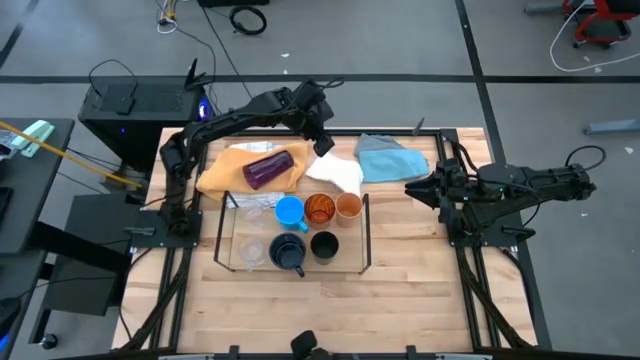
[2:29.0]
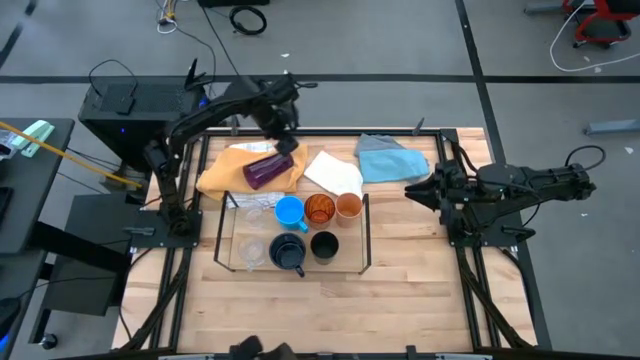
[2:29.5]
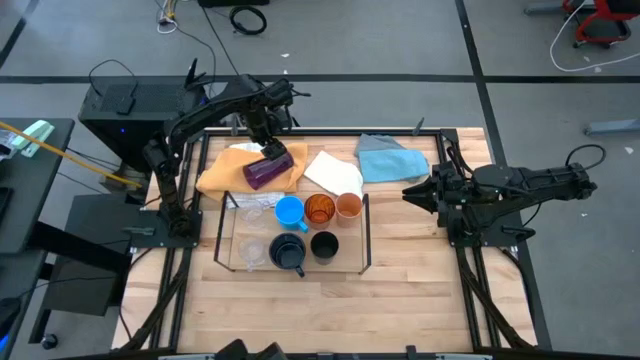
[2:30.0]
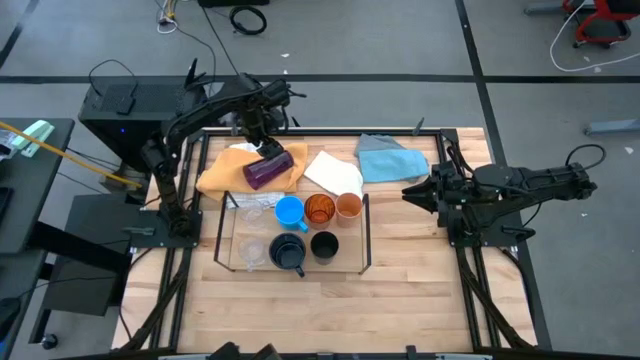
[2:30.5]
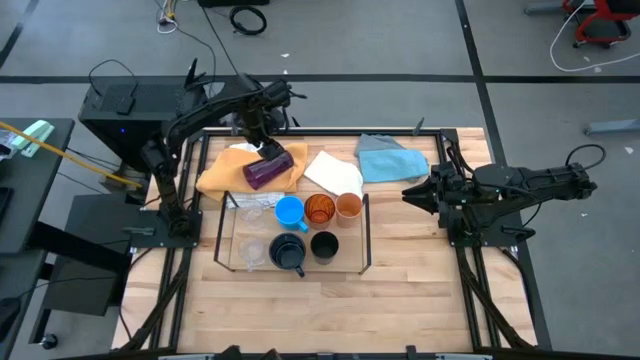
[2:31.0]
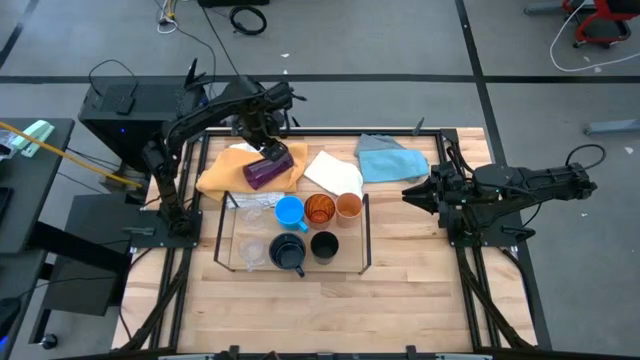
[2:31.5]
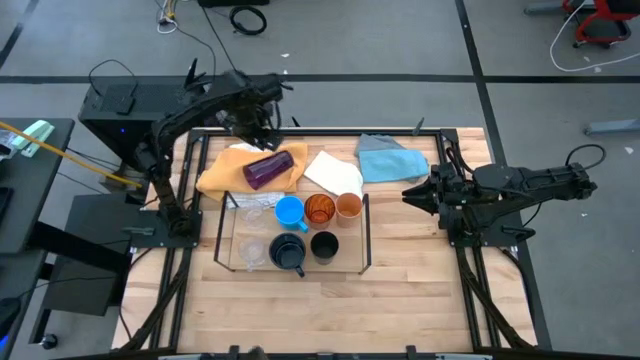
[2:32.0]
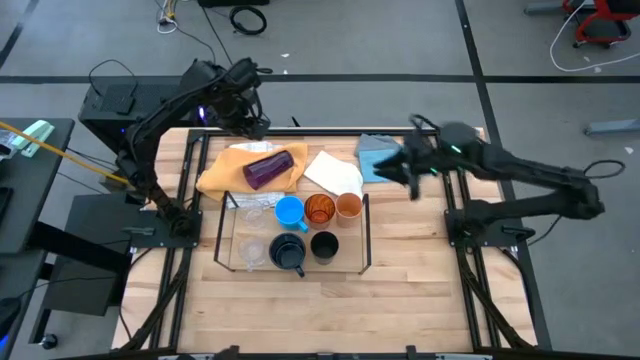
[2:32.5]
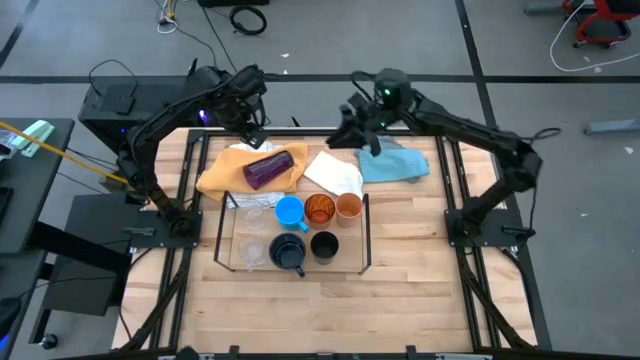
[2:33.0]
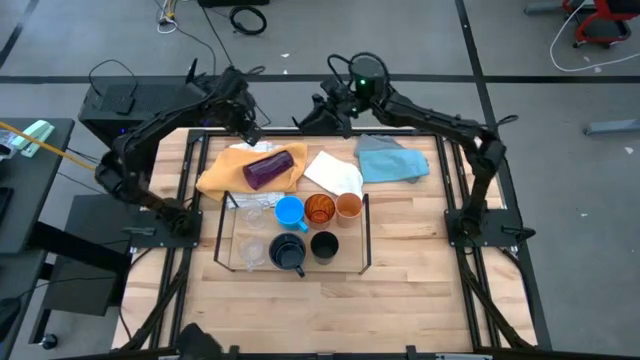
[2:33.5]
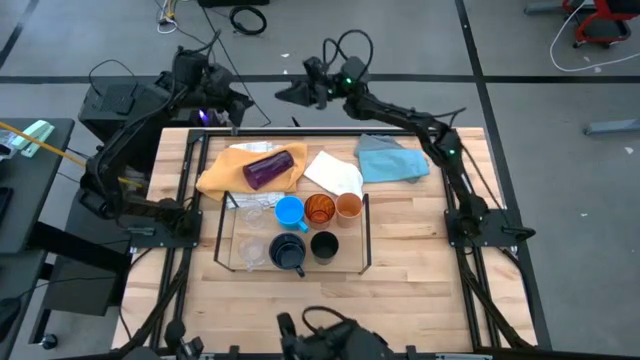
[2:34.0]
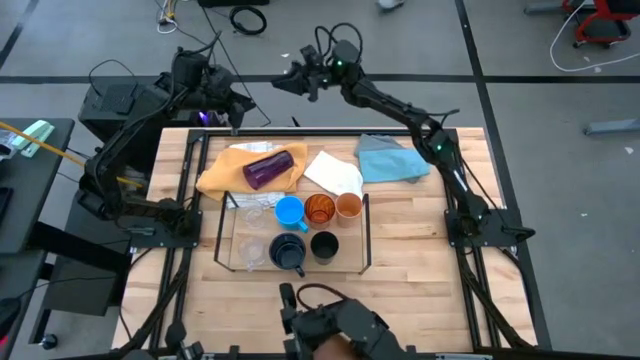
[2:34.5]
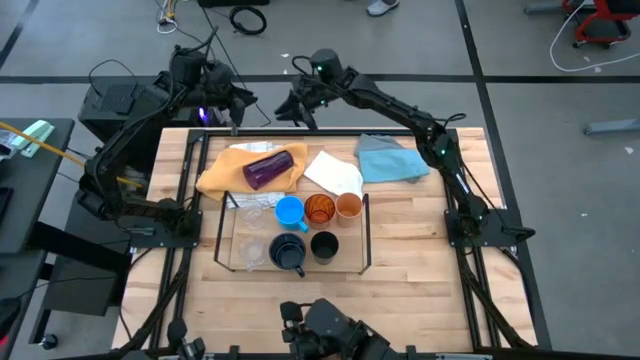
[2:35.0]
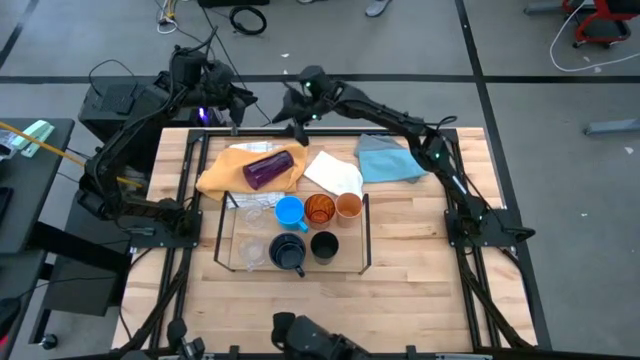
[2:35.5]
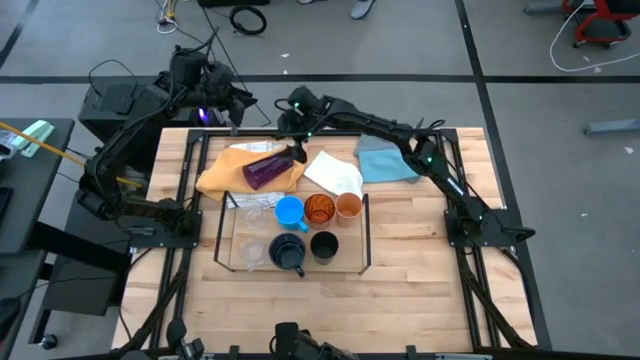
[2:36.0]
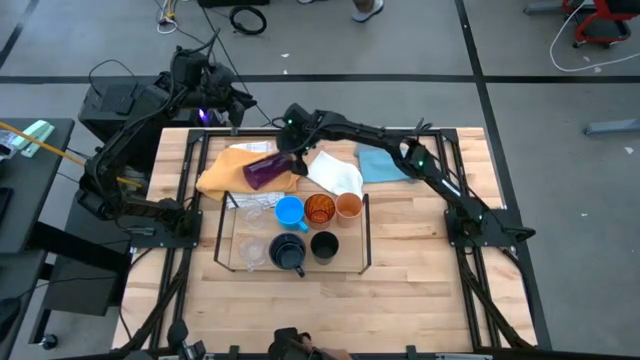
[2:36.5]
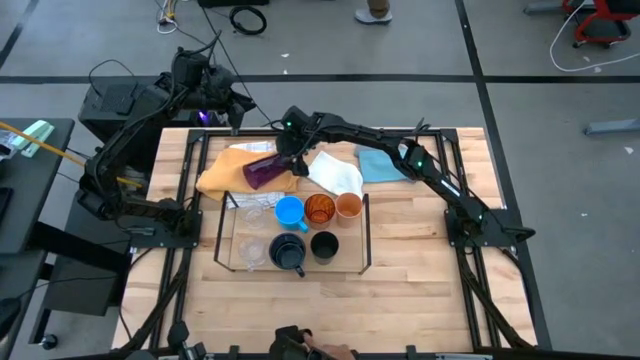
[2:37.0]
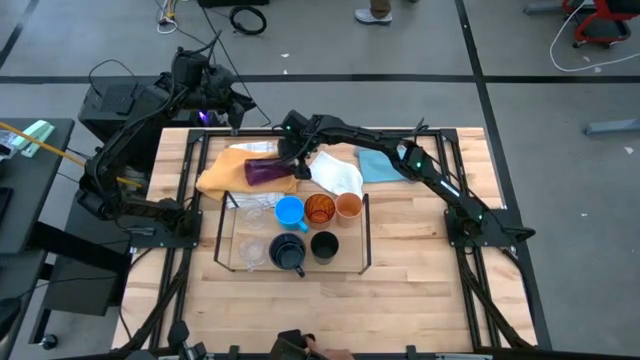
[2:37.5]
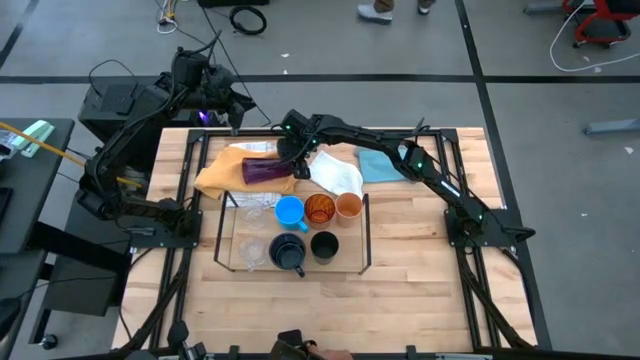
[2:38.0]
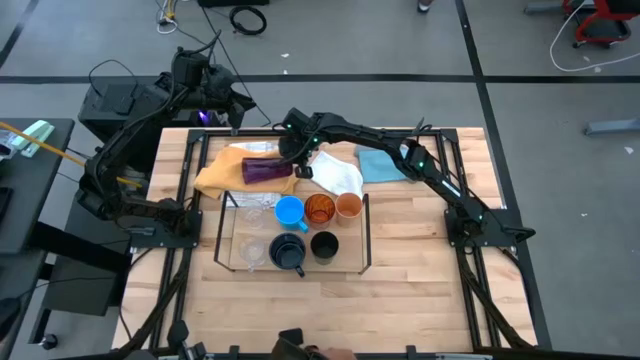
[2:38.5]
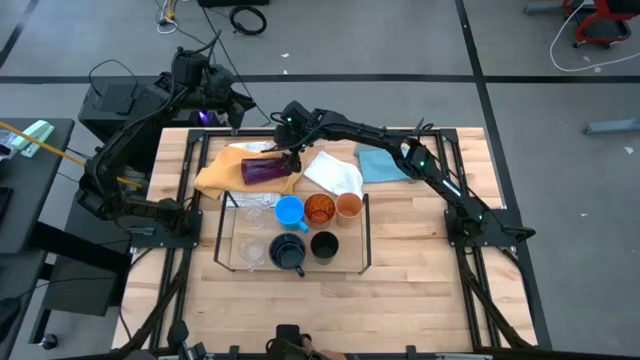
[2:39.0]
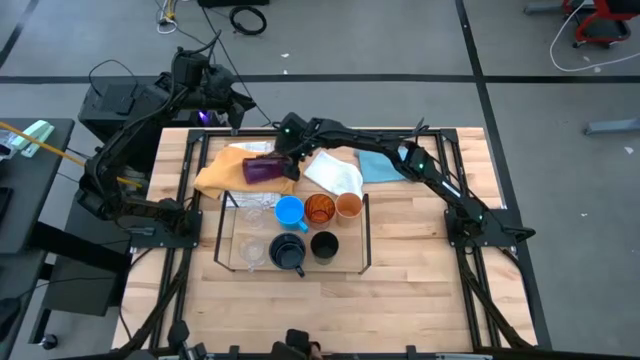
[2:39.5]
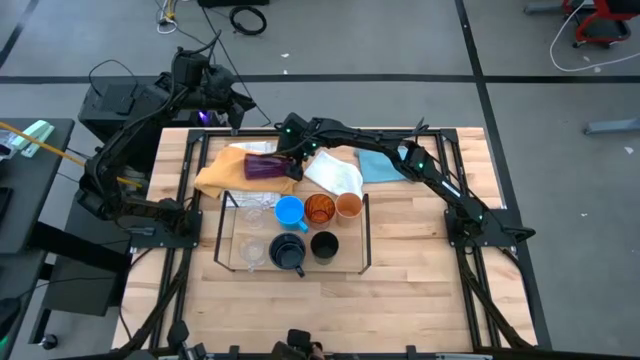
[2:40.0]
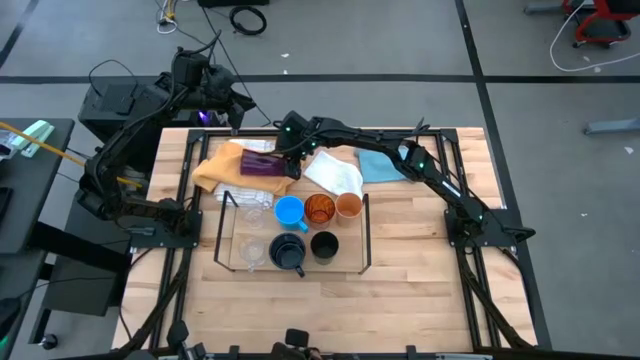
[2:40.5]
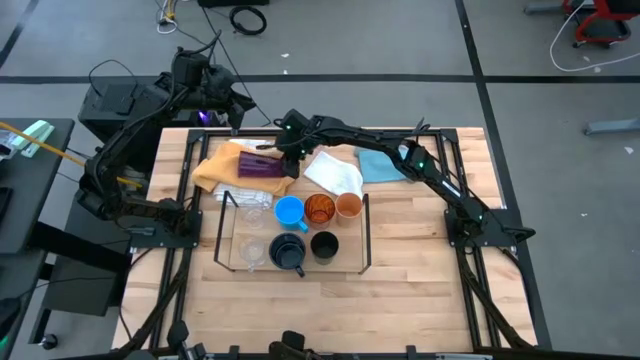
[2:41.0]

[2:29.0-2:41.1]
Task: Stack small to large cups/mugs on shelf
Put the purple cup on the shelf

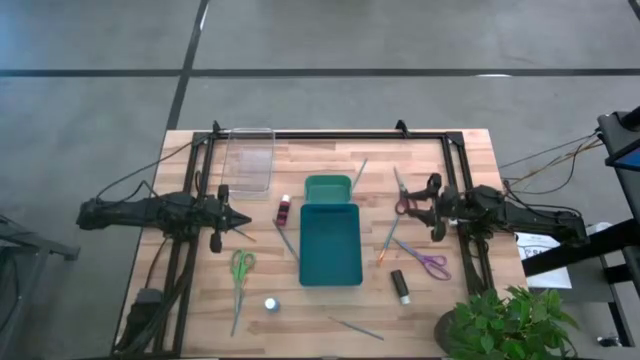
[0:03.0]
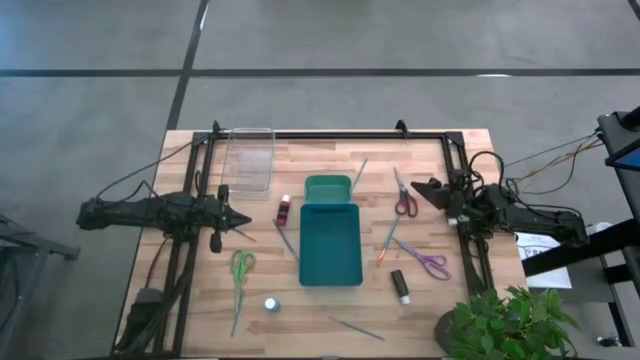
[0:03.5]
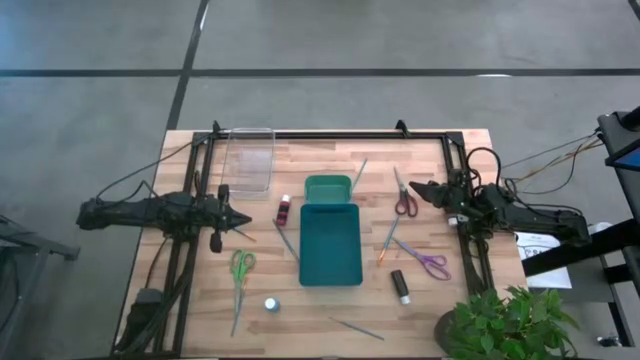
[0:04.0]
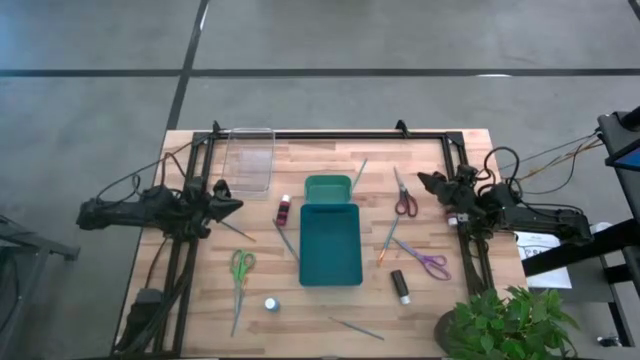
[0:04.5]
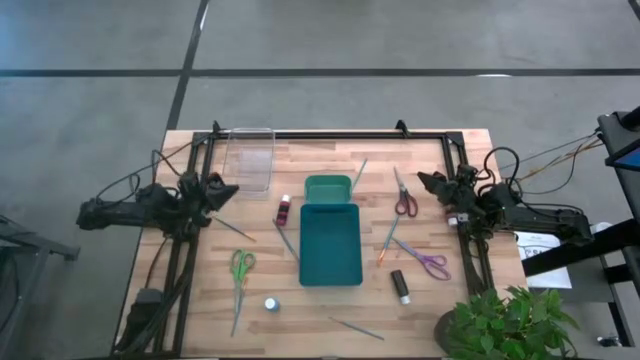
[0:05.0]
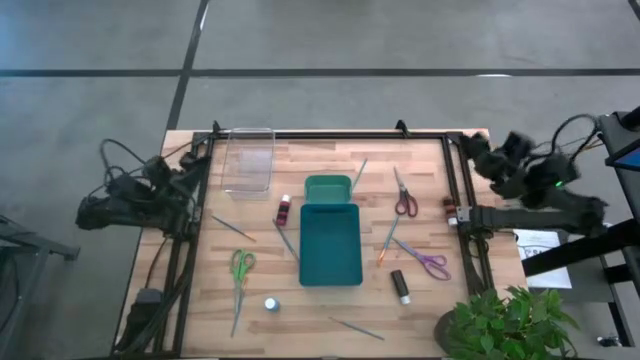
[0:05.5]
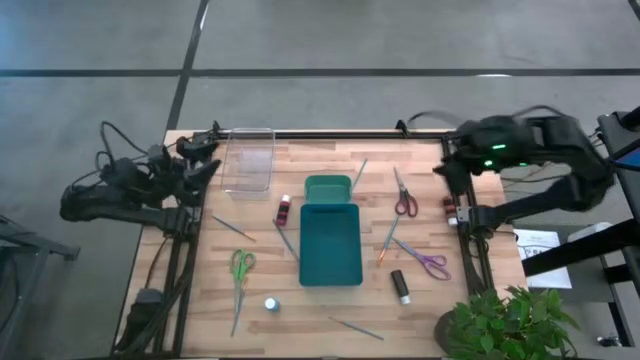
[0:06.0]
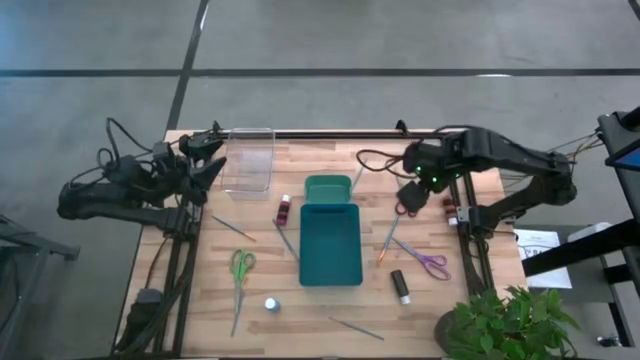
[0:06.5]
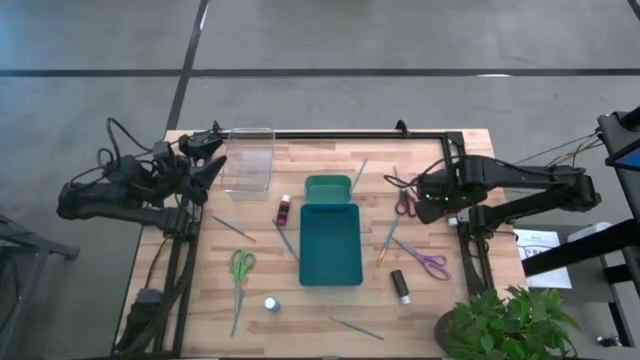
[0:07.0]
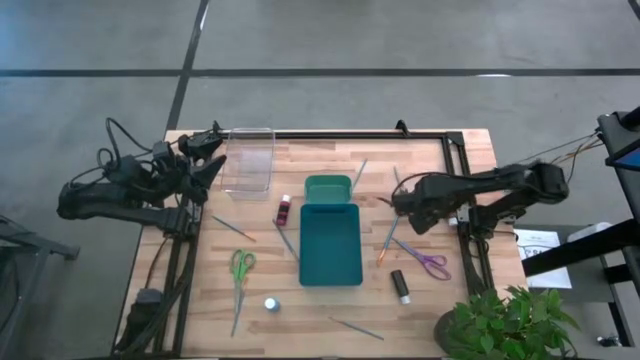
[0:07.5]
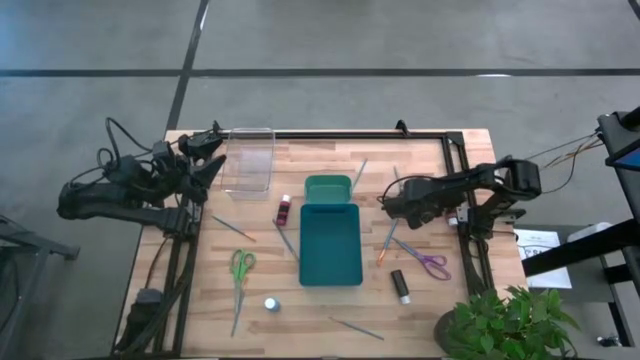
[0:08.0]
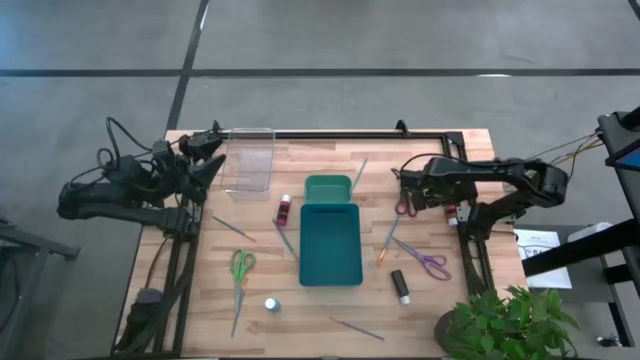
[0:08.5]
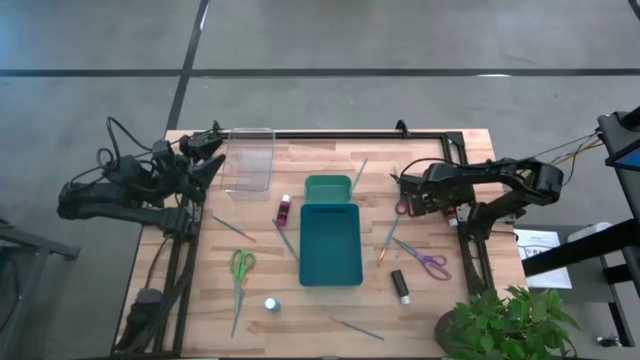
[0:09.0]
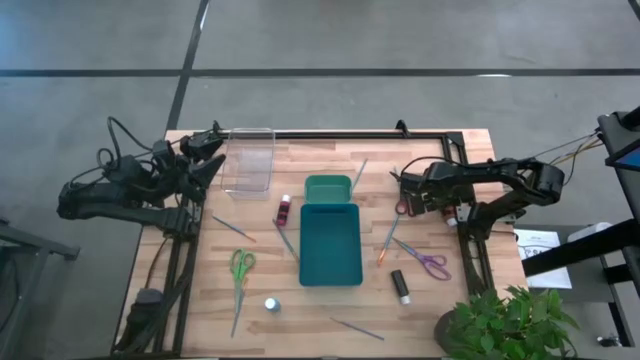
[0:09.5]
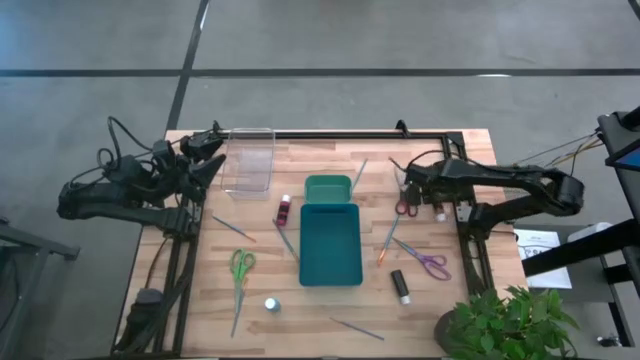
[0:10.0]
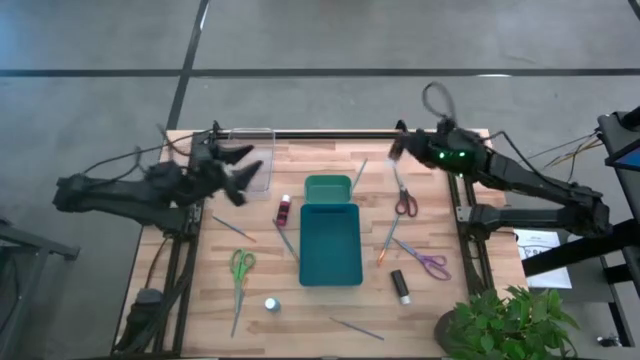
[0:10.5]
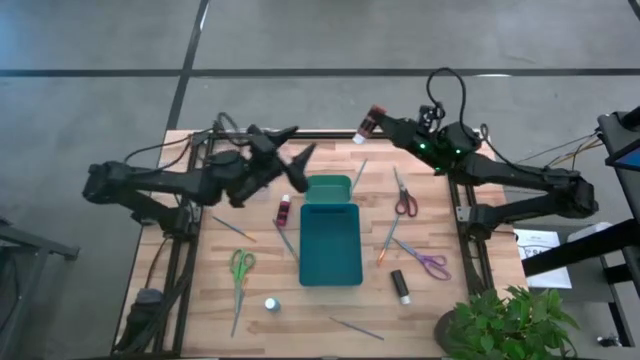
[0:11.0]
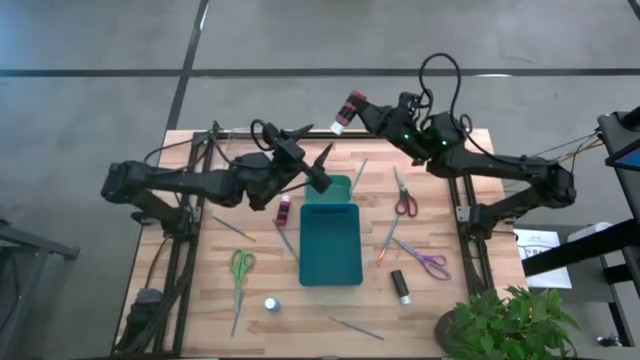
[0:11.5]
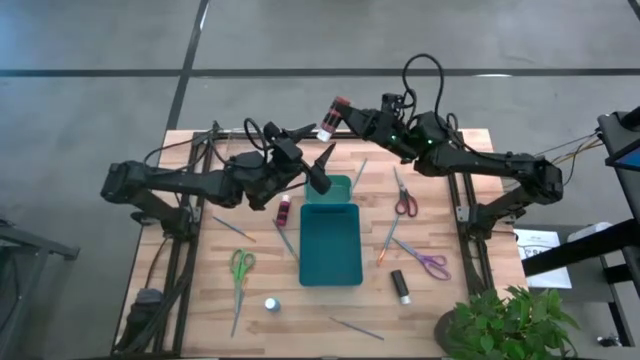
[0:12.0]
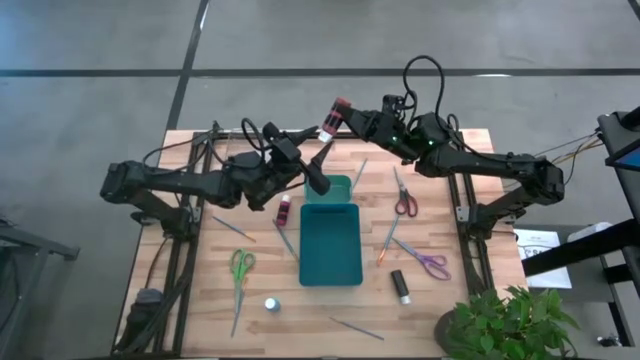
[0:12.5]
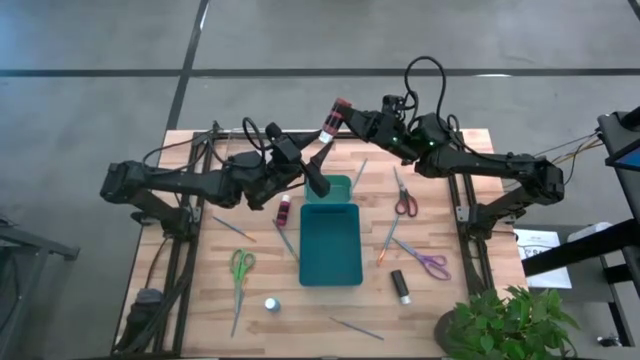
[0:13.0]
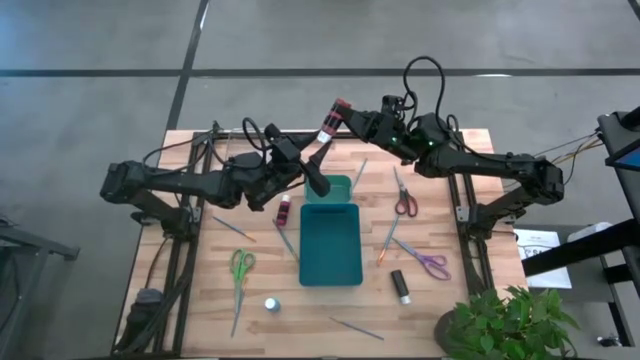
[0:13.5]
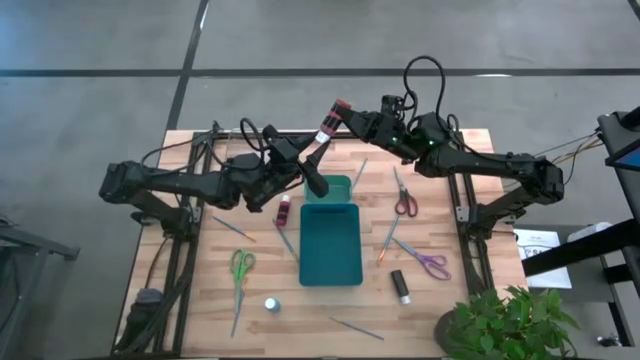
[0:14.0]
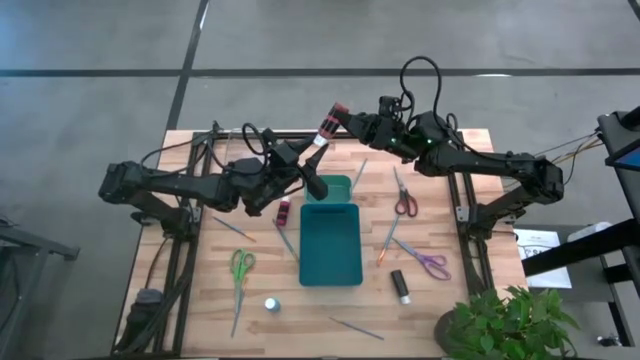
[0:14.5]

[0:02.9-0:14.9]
Task: Pick & Place Paint Supplies
Put the orange paint bottle into the green bin
